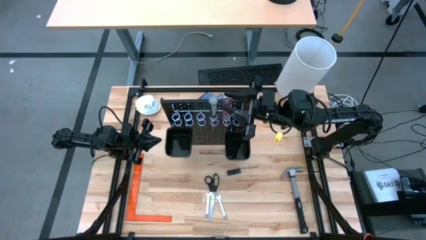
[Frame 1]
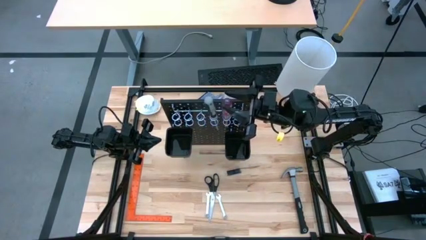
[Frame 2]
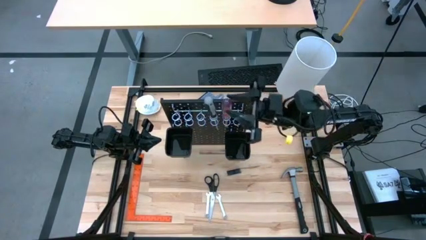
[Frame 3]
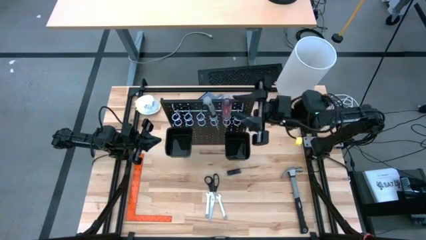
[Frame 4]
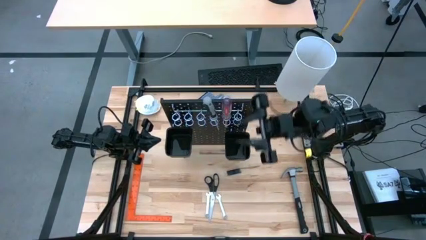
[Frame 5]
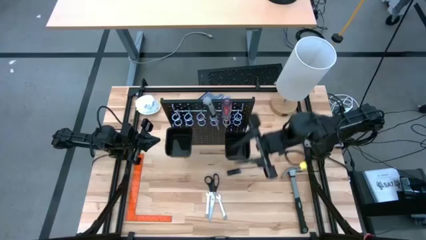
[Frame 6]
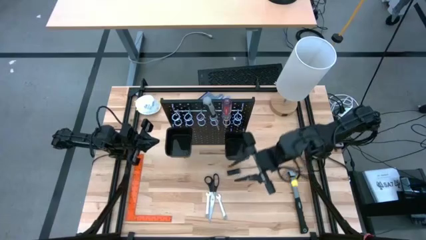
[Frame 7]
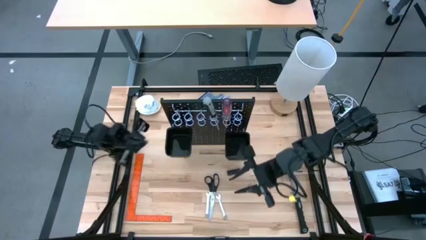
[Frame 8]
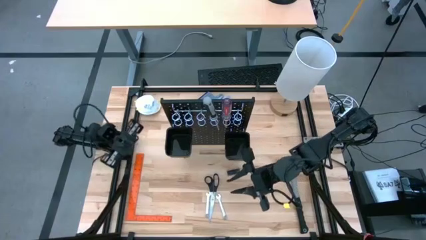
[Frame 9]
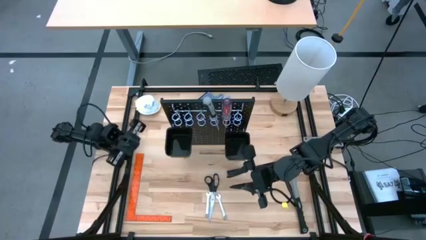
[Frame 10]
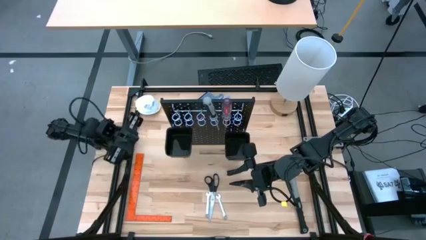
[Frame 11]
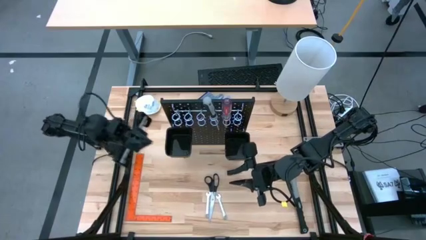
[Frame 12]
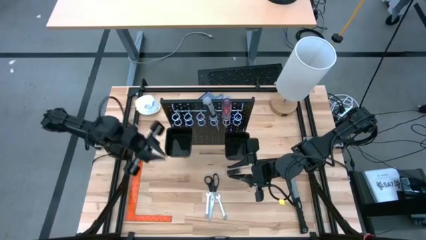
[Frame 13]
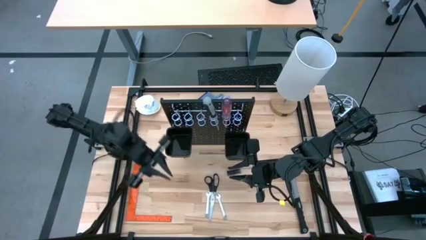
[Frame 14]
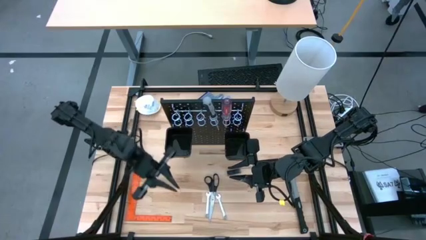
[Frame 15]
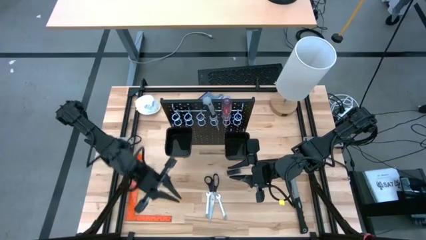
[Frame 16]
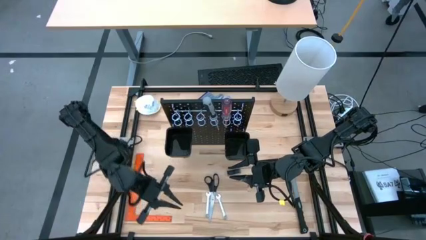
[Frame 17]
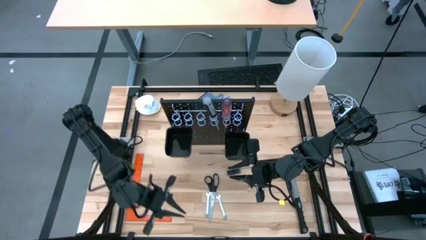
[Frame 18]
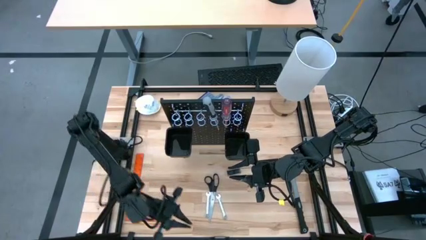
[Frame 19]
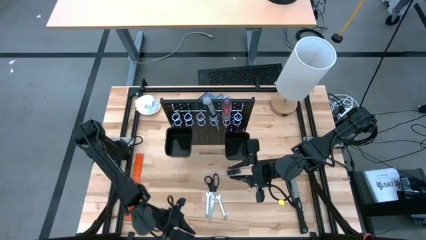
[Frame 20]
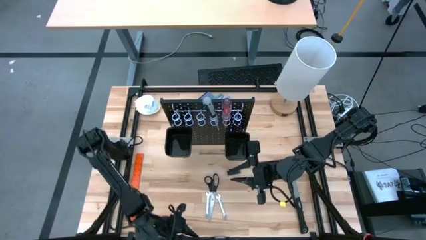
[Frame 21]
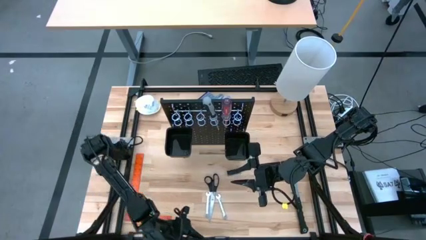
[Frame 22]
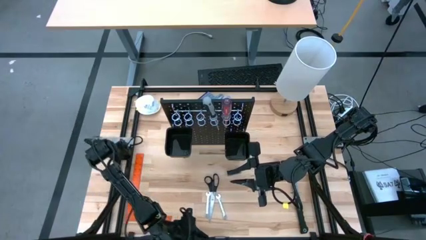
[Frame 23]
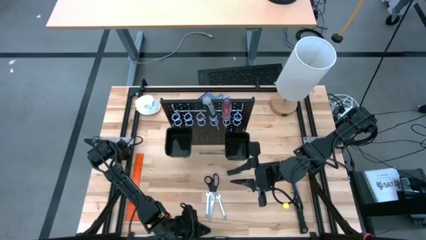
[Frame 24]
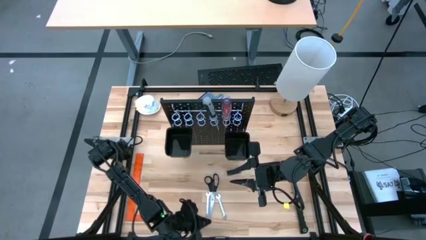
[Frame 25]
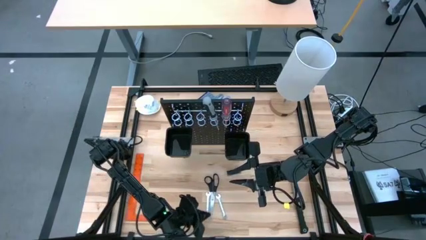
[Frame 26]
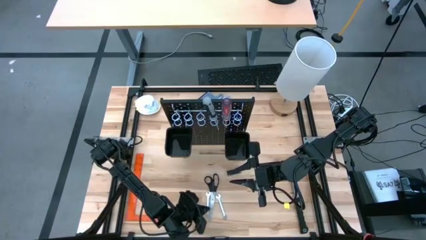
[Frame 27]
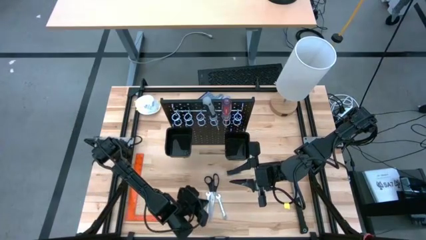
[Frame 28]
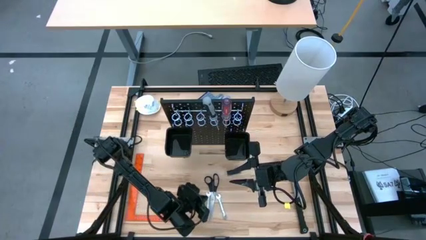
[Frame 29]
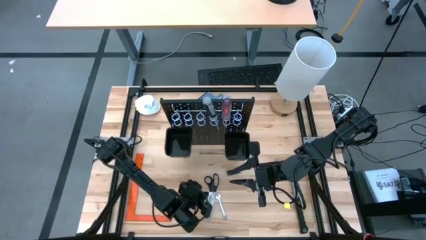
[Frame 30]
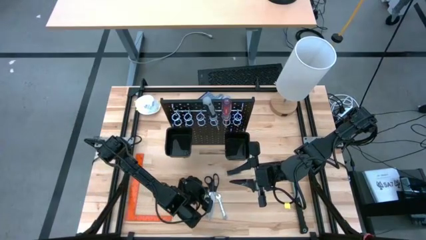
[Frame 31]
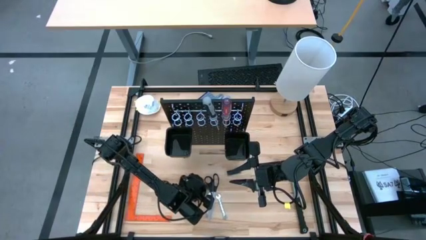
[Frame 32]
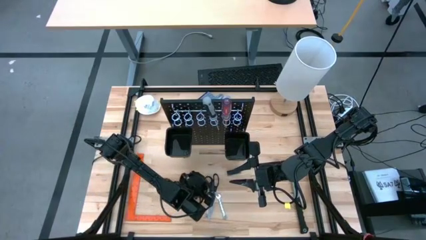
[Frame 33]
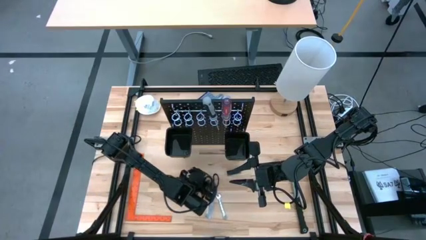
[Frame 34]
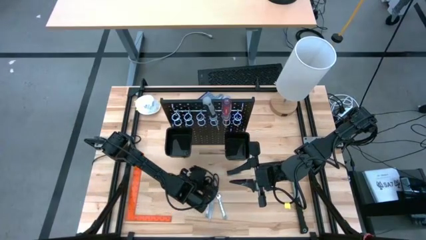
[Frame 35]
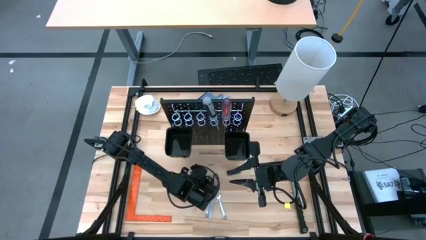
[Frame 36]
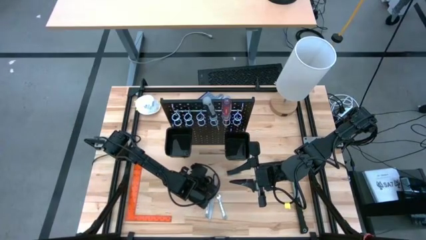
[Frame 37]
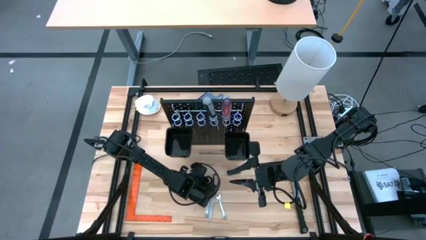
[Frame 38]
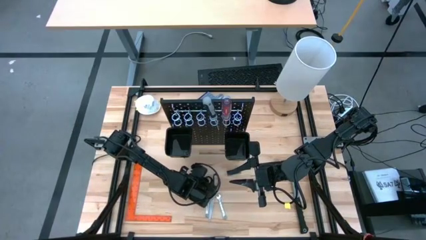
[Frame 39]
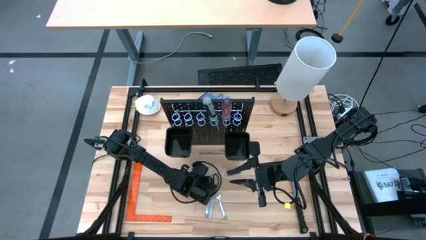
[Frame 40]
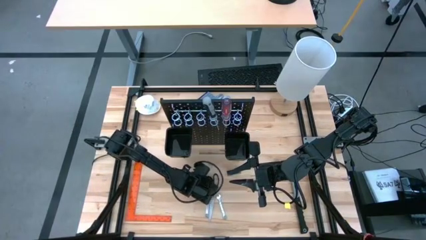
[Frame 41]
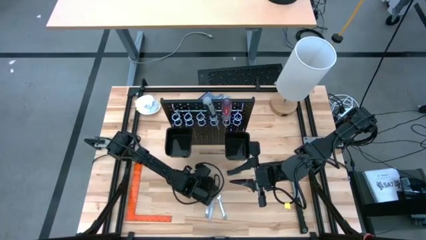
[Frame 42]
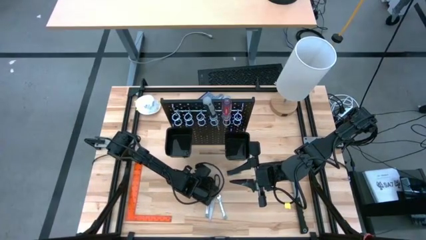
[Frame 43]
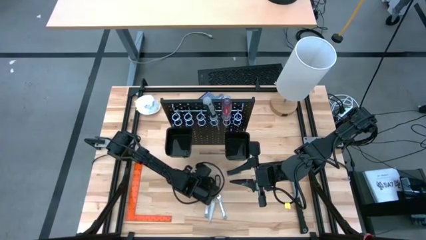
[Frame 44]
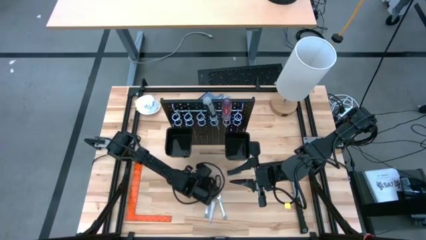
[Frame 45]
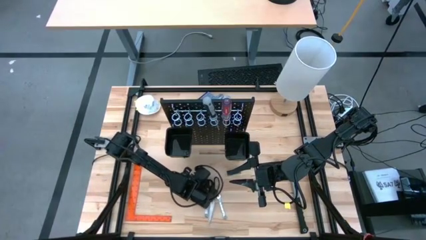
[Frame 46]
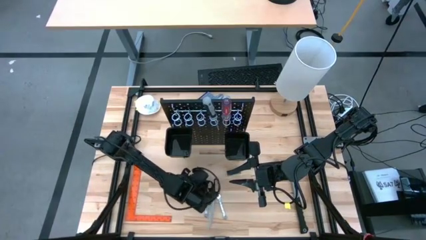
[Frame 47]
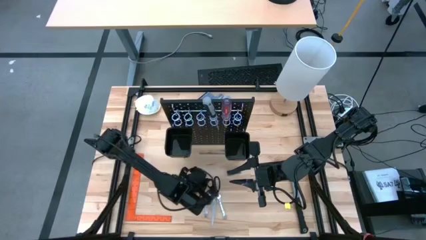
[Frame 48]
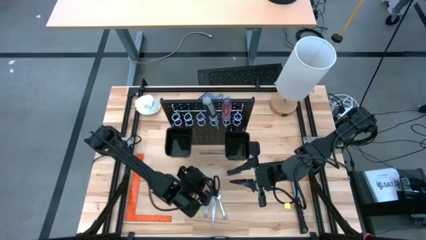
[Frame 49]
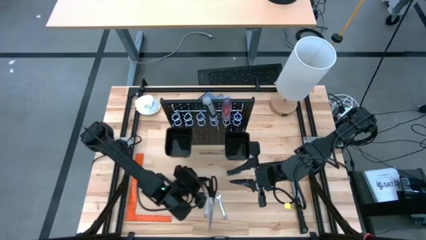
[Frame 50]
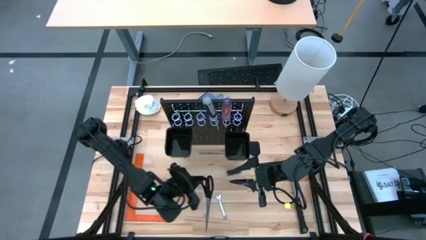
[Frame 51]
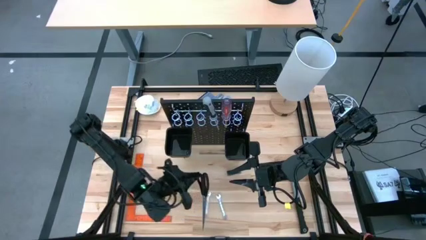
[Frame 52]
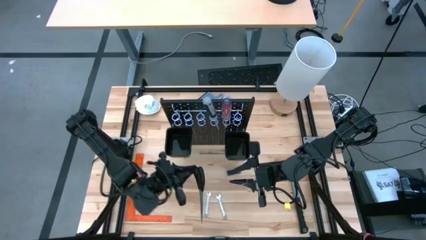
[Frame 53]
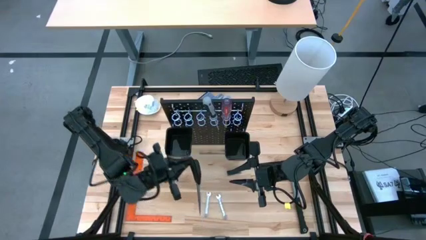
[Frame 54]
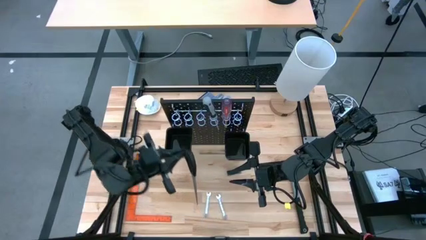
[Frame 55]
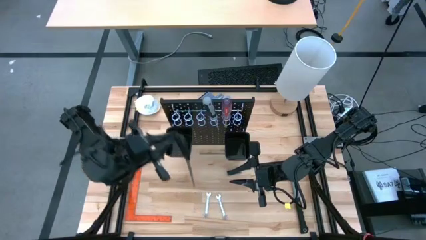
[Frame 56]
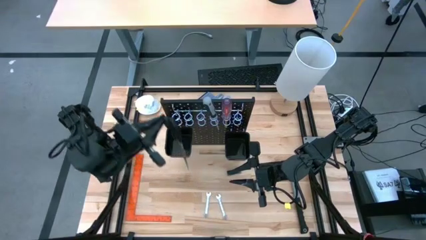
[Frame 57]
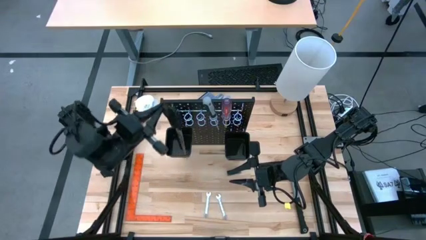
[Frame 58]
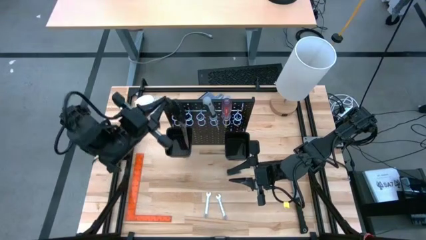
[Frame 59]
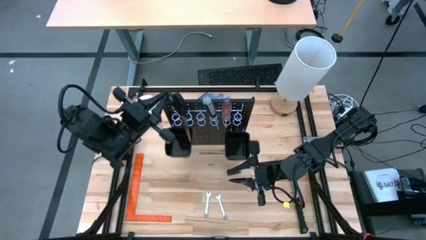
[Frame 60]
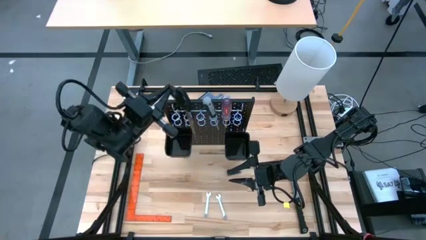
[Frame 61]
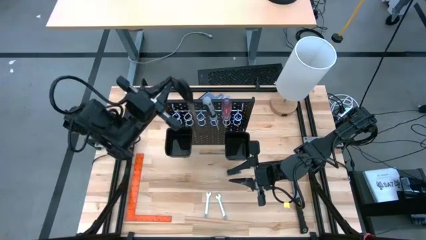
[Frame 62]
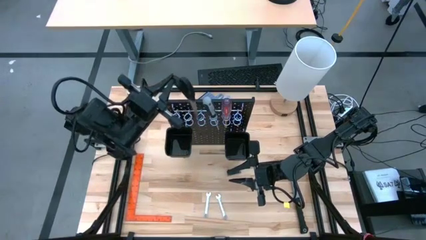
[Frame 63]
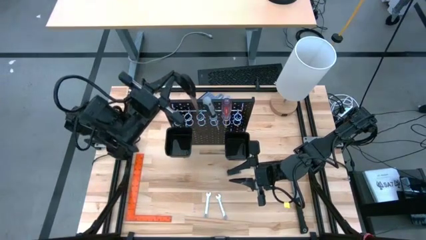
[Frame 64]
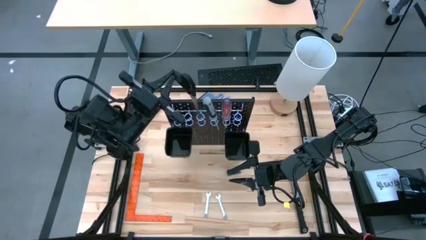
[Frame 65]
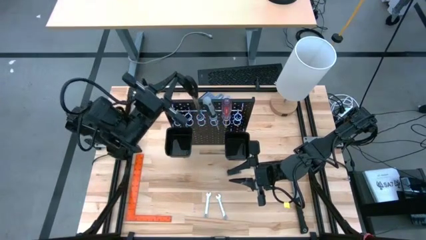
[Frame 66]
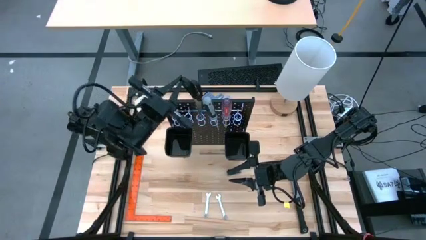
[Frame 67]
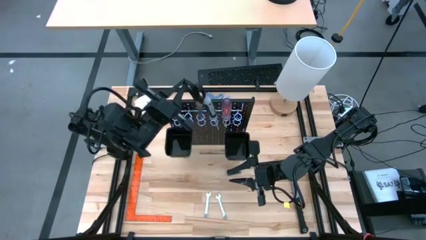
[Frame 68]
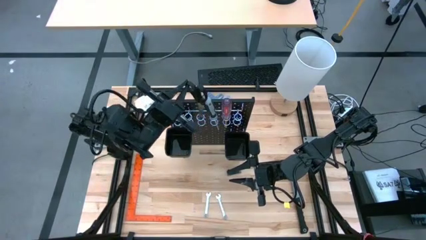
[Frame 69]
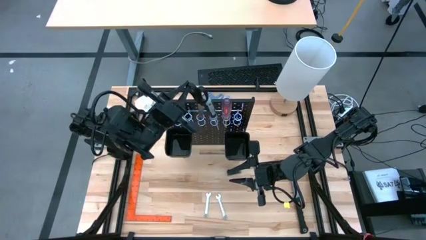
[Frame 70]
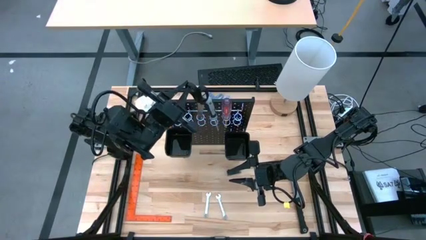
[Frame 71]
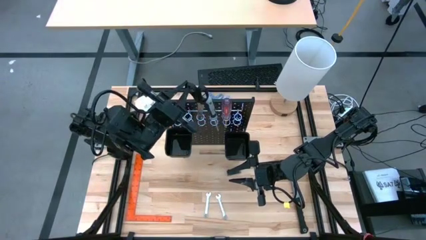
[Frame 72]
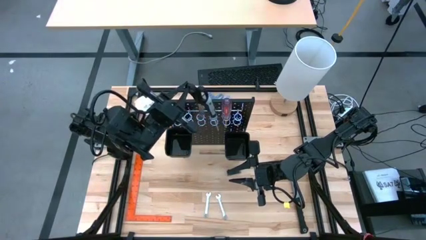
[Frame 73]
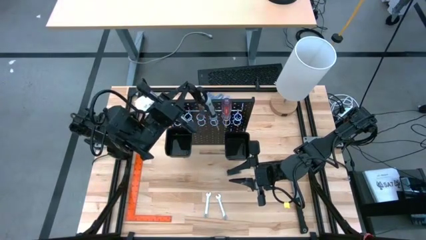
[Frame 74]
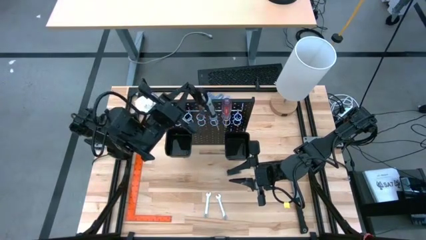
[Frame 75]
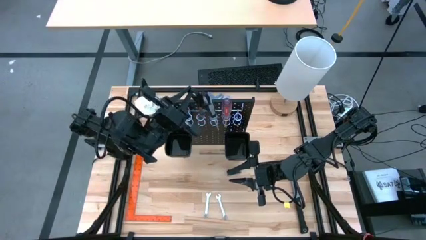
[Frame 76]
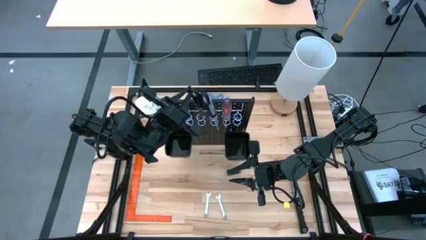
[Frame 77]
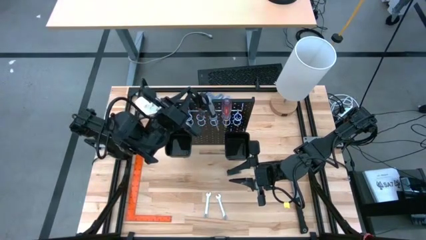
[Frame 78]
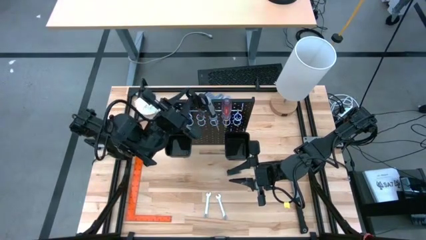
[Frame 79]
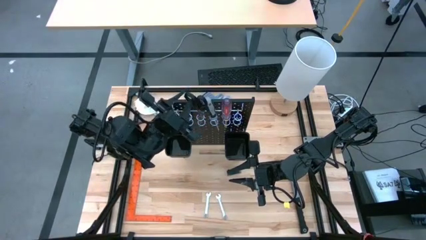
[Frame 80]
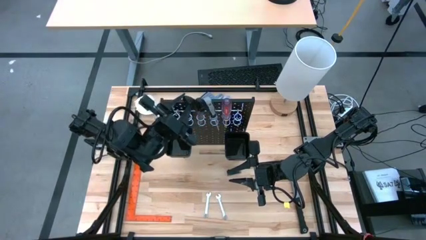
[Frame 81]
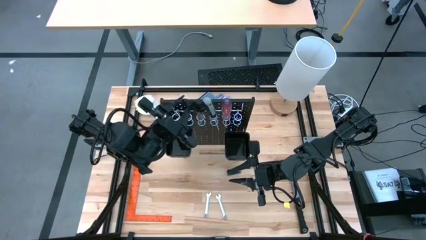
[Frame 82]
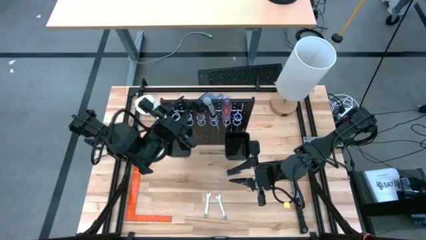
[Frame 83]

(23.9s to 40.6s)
Task: Hang tools onto peg board
Hang the black scissors on the black peg board
